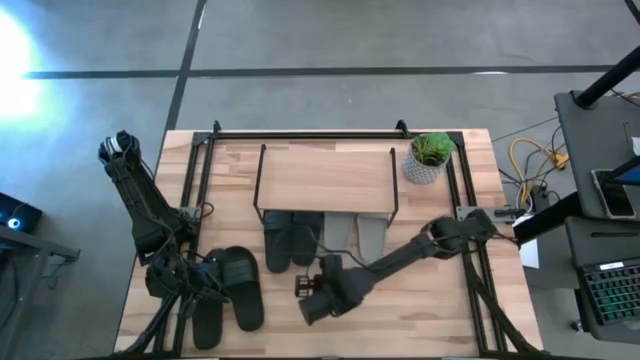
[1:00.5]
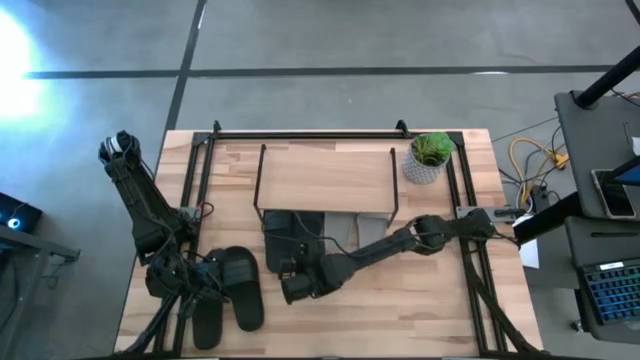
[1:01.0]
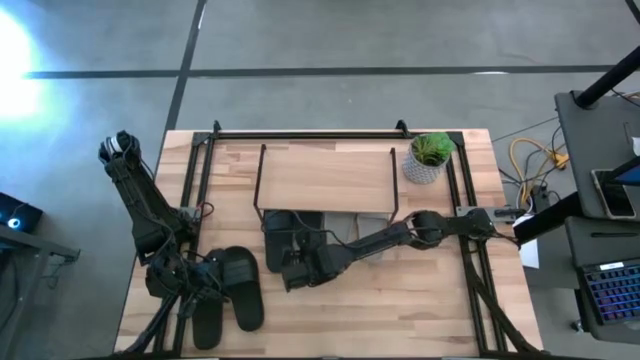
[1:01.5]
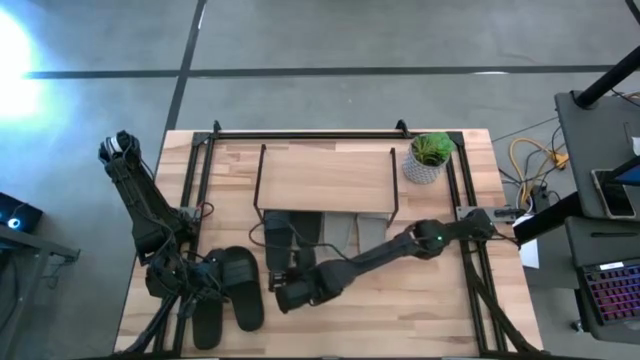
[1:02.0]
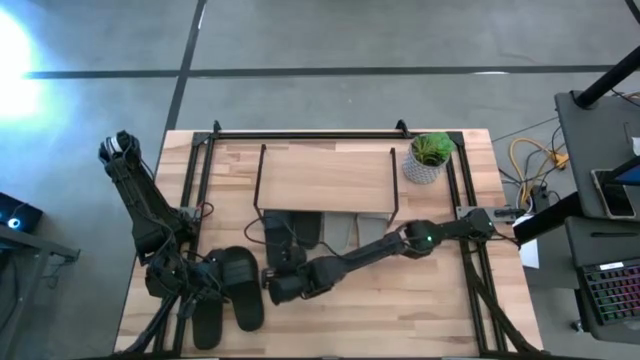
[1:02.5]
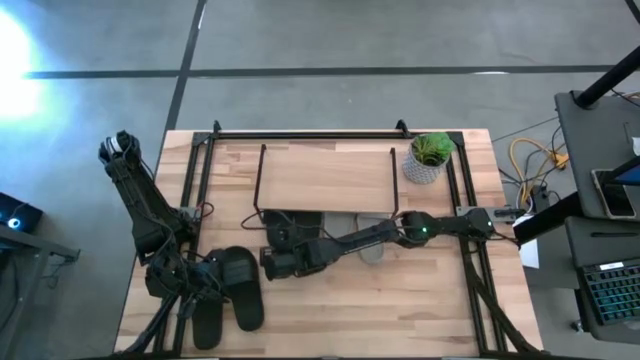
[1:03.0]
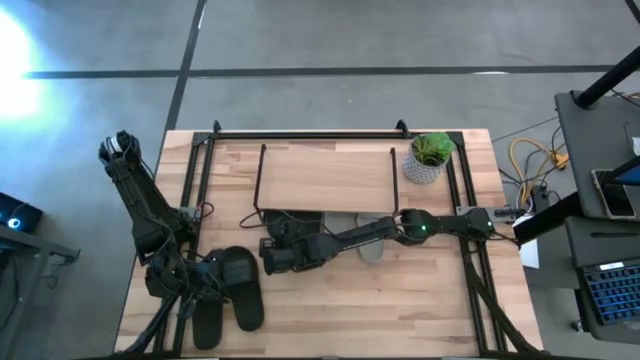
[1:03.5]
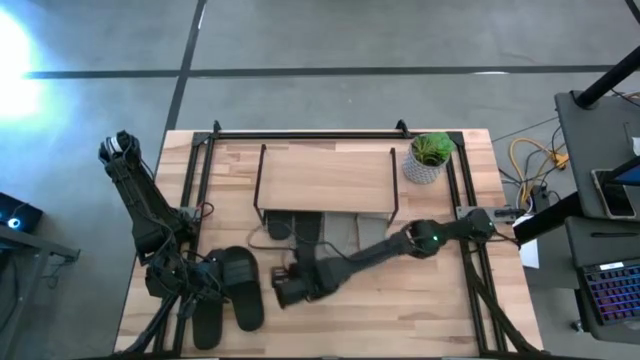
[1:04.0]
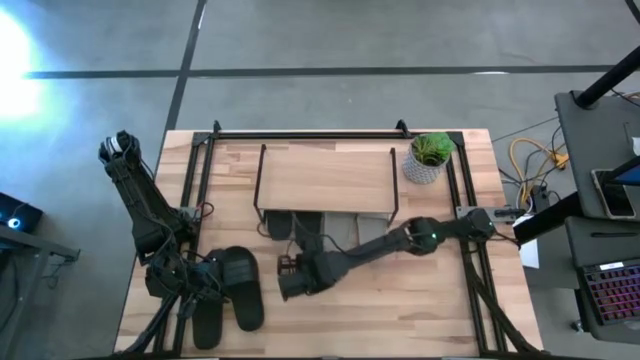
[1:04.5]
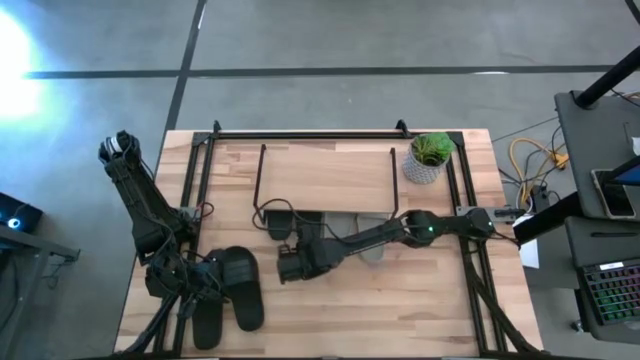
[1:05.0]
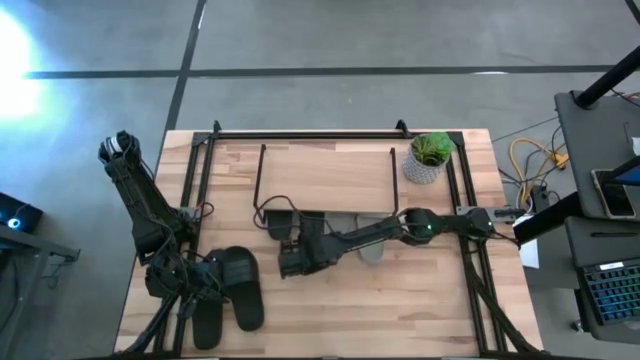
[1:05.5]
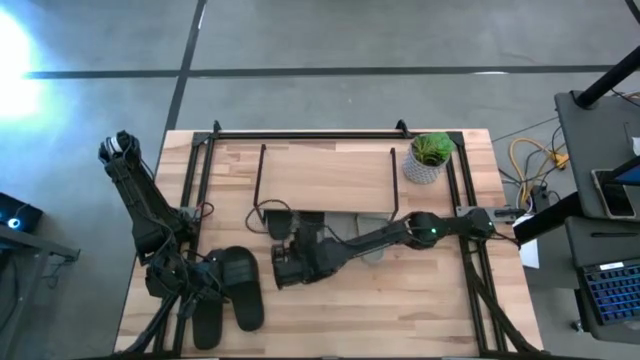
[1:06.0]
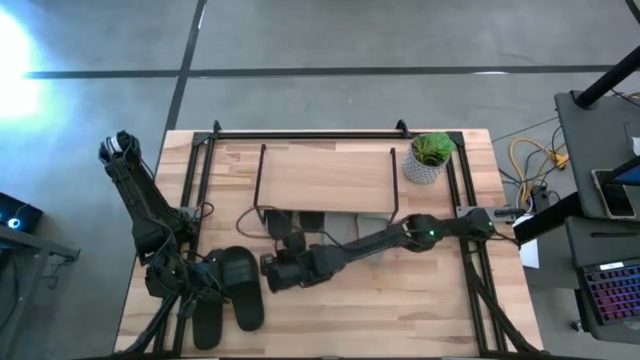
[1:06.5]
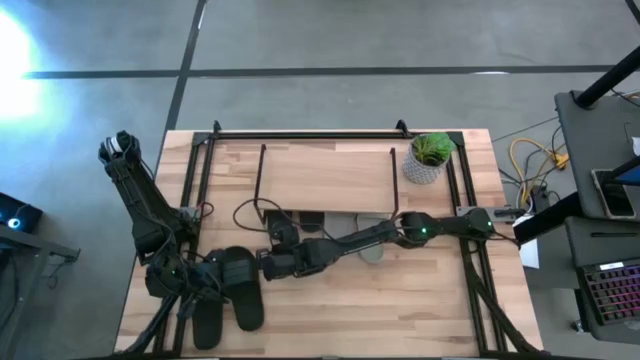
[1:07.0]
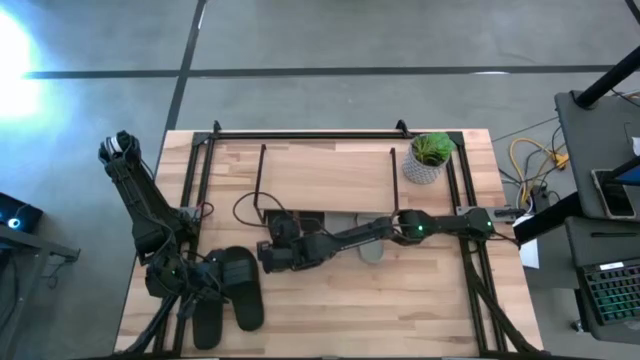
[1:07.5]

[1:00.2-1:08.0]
Task: Pick and place slides into the shelf
Adjust the black slides under the shelf

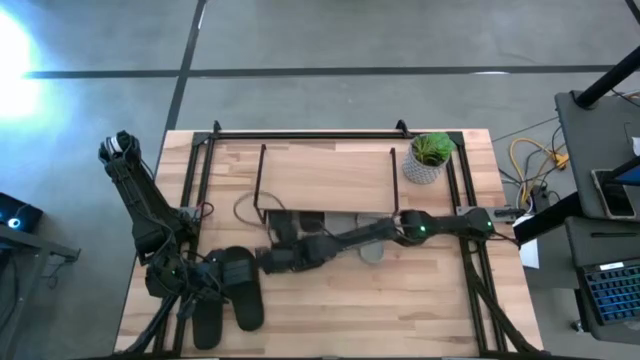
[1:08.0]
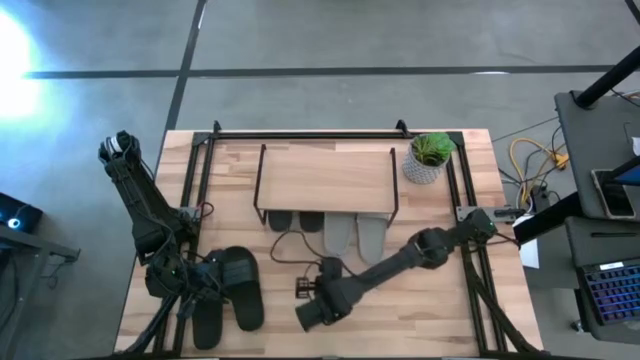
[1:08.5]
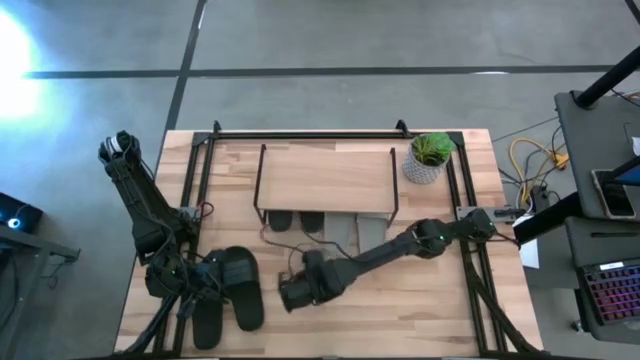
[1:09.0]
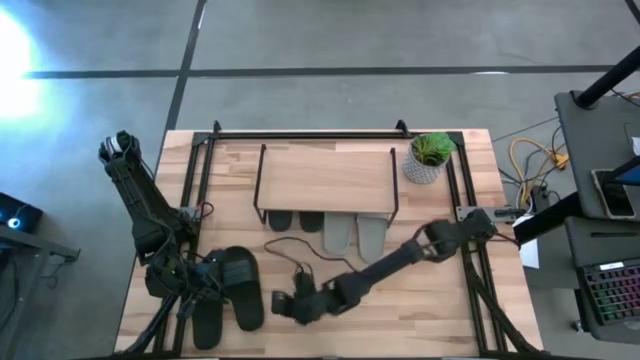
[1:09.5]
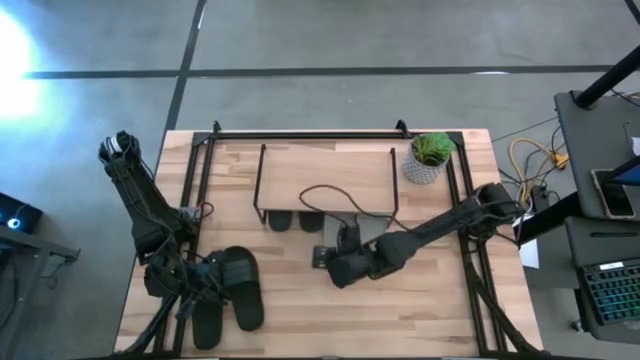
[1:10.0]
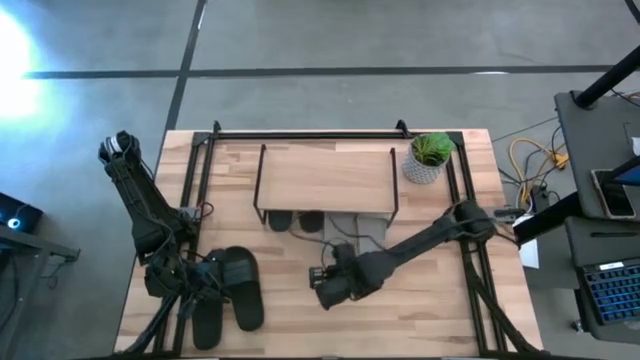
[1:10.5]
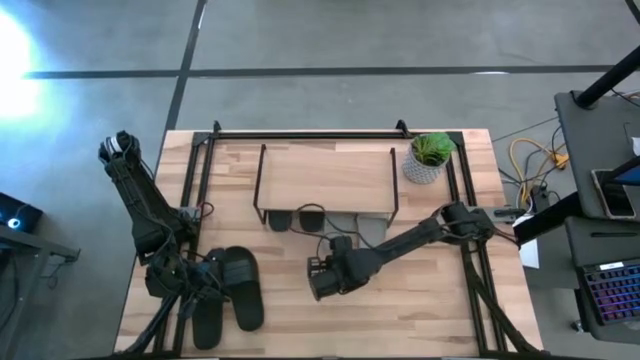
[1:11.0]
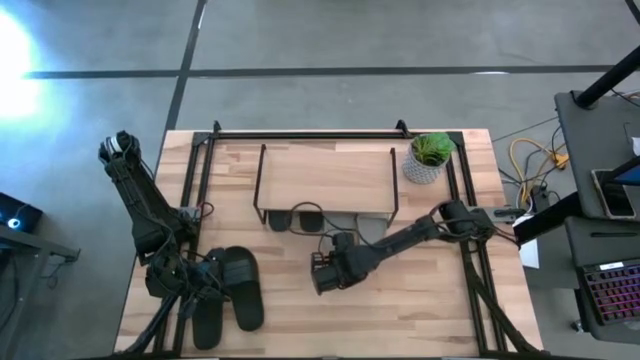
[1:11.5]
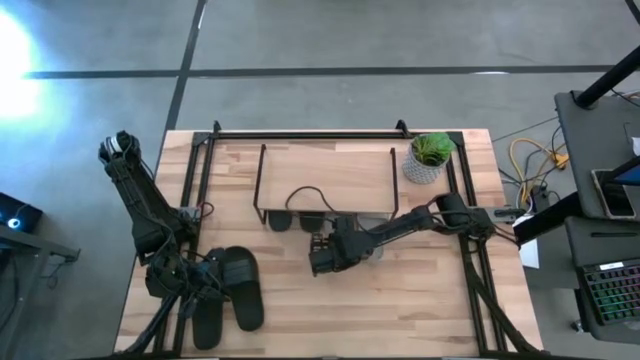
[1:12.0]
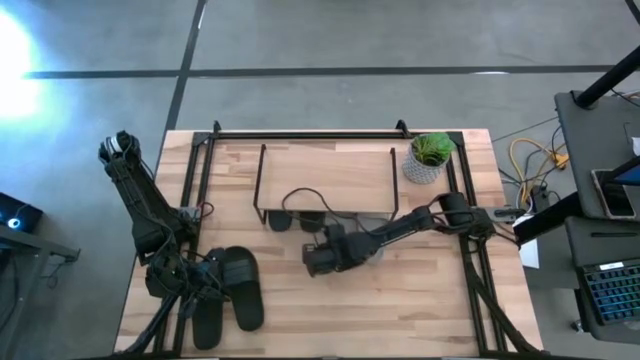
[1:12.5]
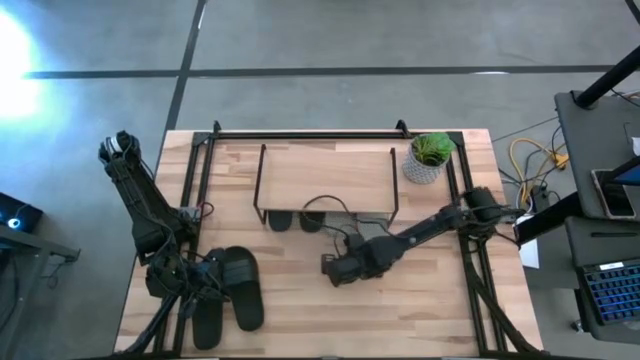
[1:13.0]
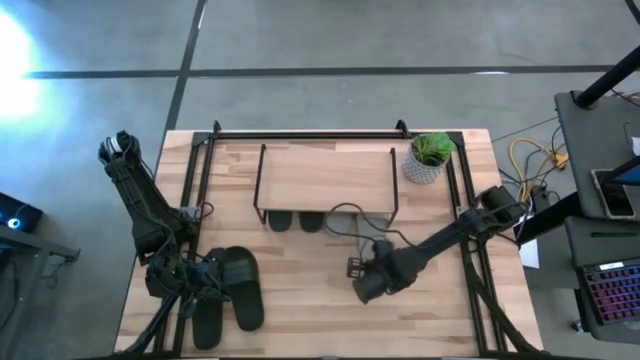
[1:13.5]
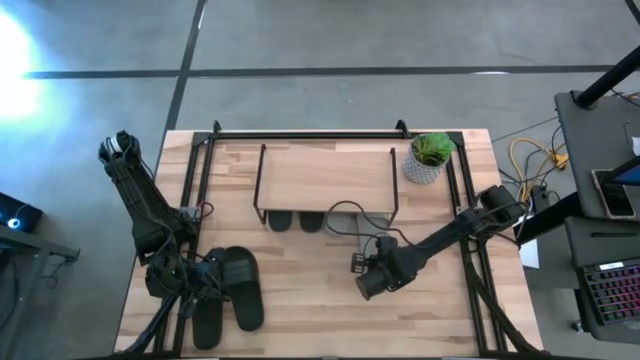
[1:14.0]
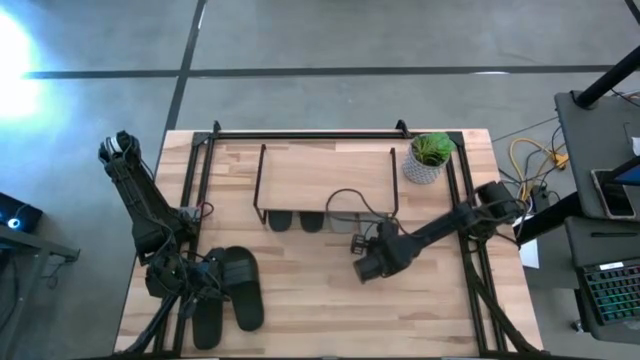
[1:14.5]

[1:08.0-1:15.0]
Adjust the grey slides under the shelf

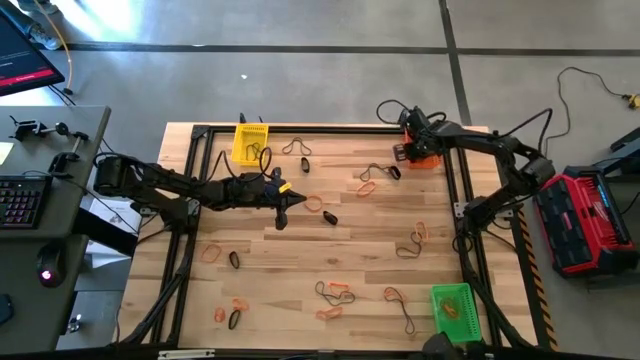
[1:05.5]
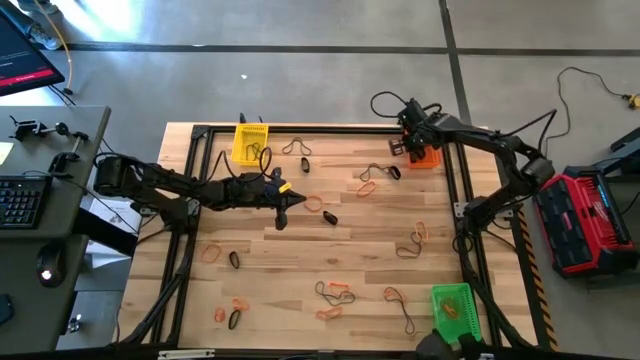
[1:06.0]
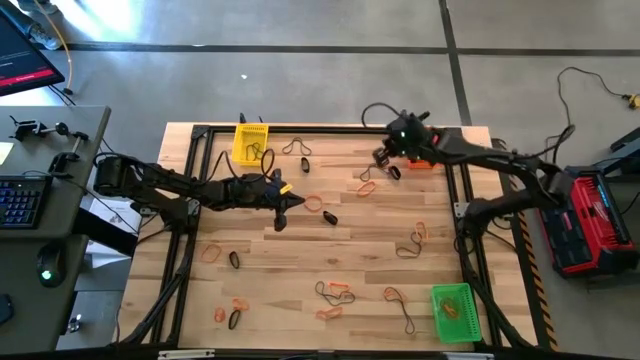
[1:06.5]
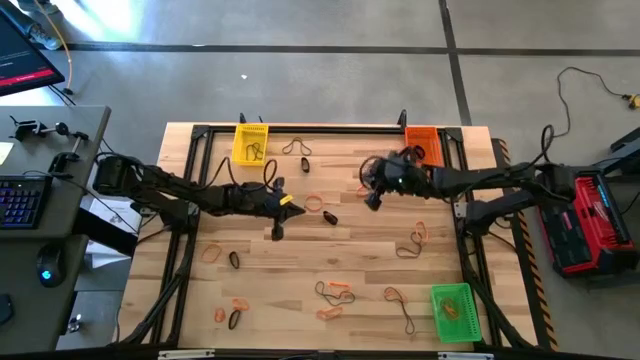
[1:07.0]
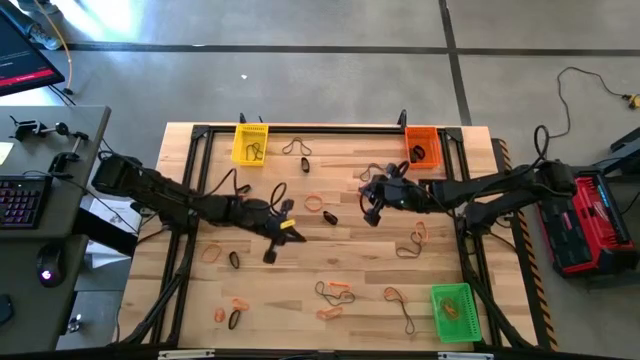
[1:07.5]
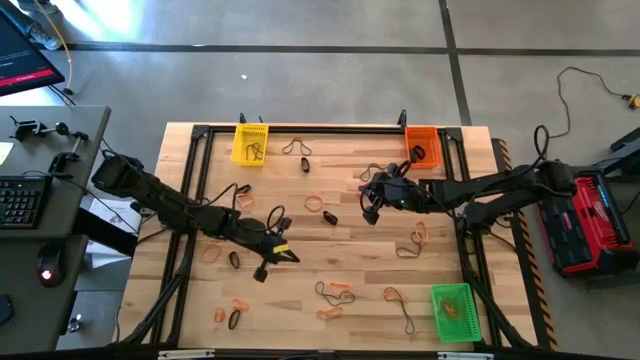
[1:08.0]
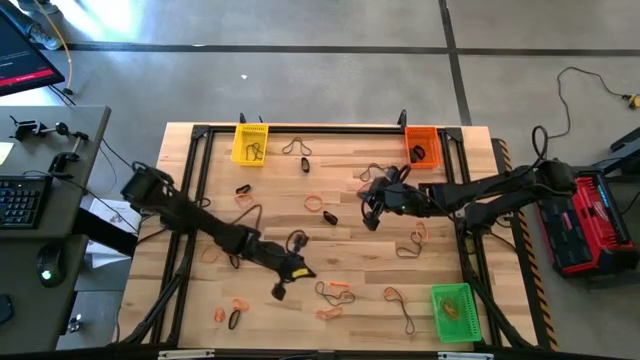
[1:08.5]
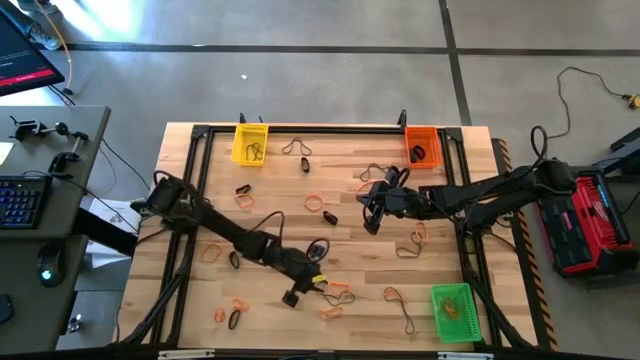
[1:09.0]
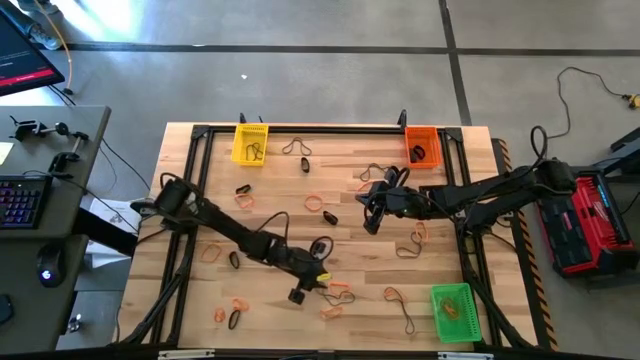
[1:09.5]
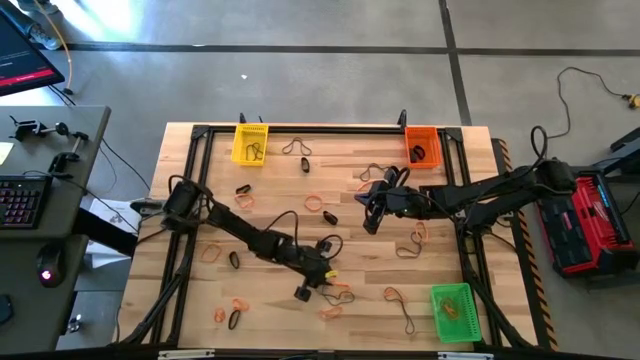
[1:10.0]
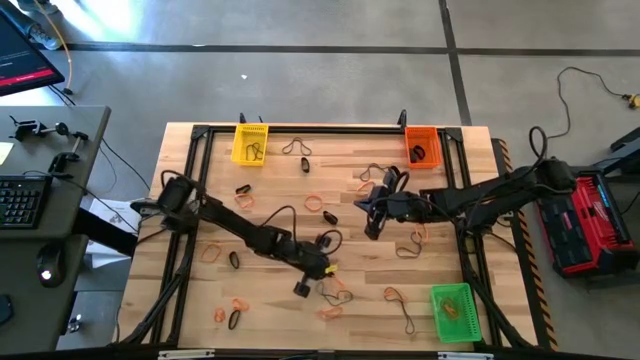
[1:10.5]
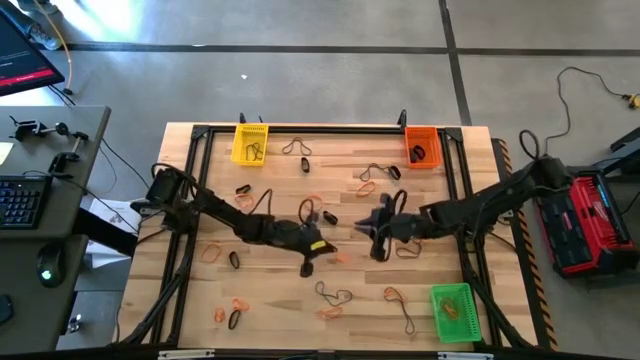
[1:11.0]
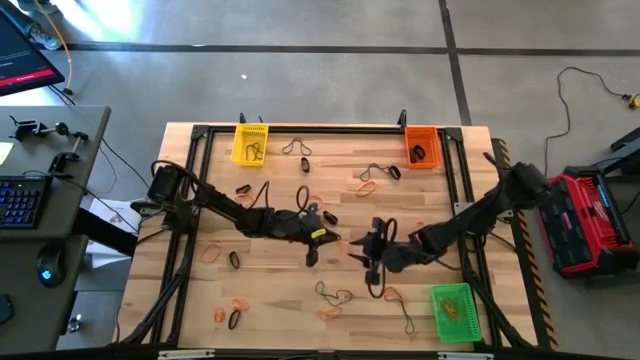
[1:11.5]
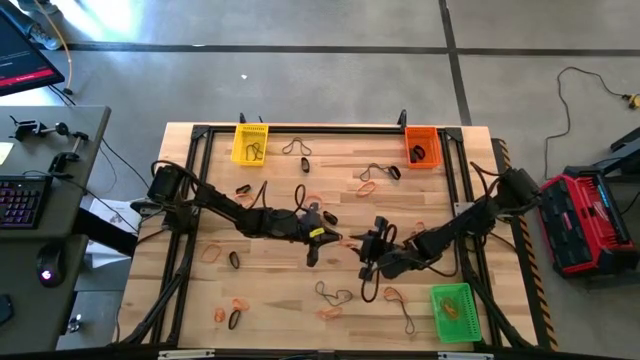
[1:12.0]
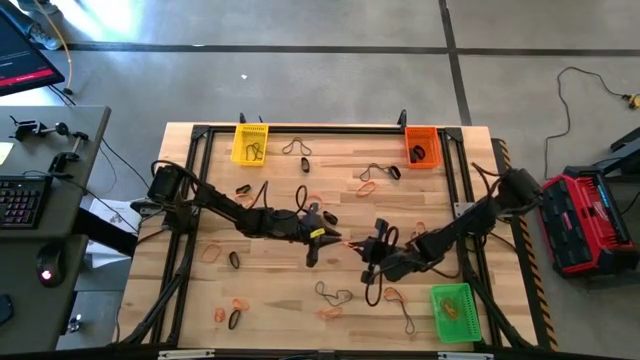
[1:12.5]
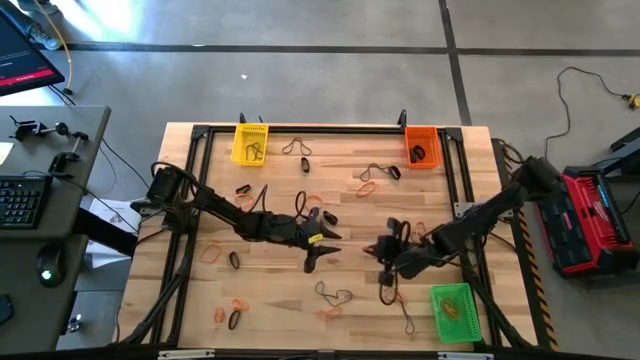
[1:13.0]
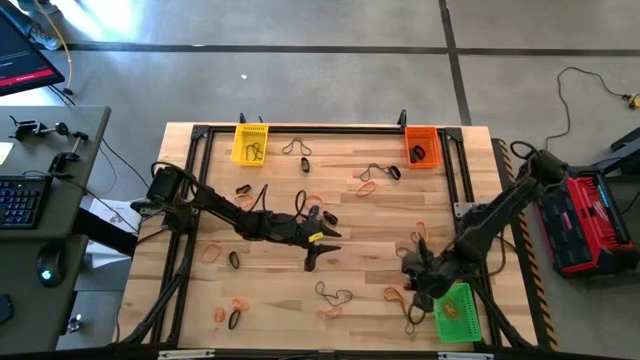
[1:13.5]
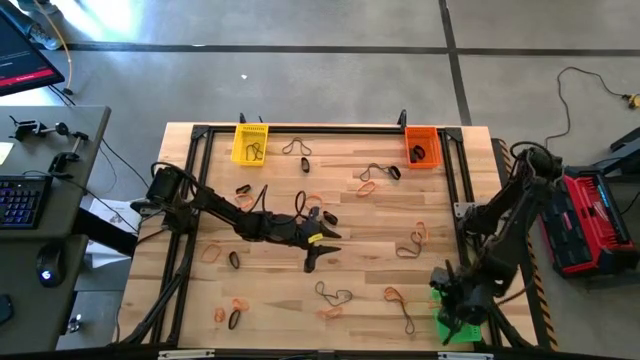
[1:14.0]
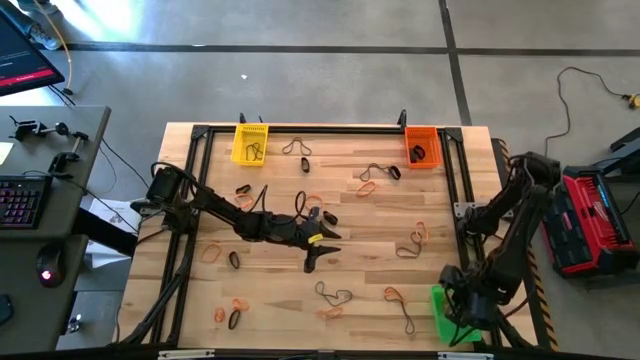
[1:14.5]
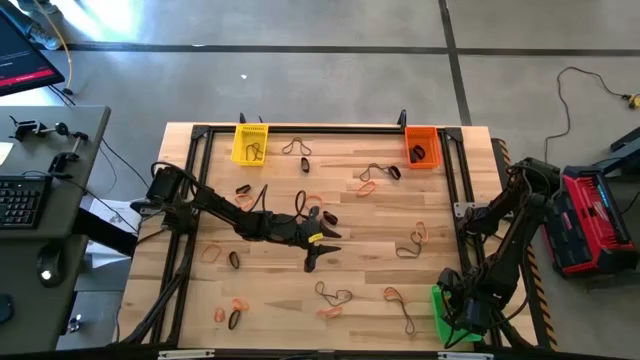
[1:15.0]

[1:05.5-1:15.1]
Task: Sort rubber bands into baskets
Put the orange rubber band into the green bin
